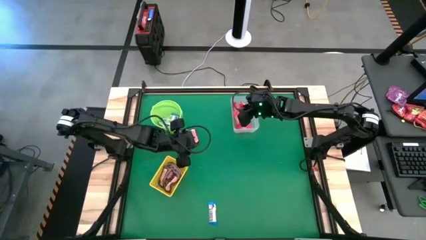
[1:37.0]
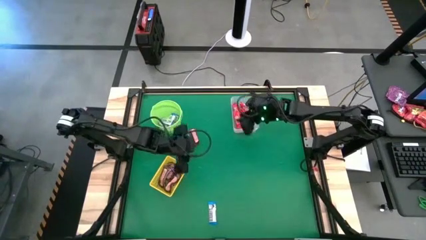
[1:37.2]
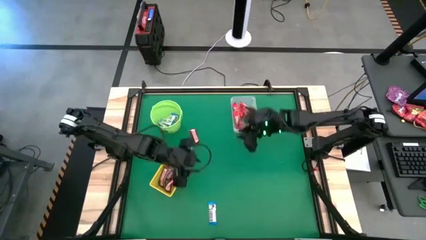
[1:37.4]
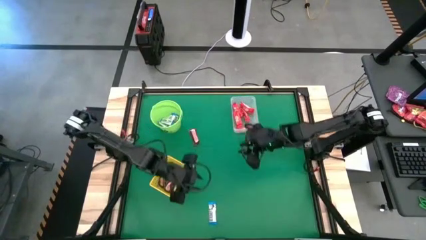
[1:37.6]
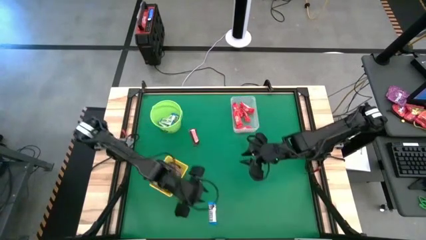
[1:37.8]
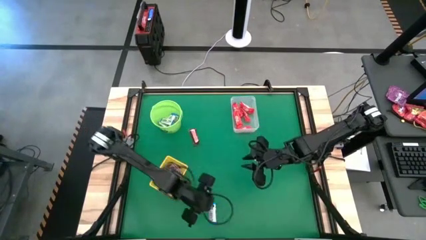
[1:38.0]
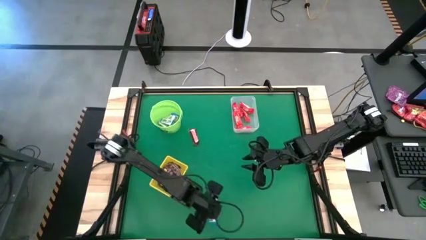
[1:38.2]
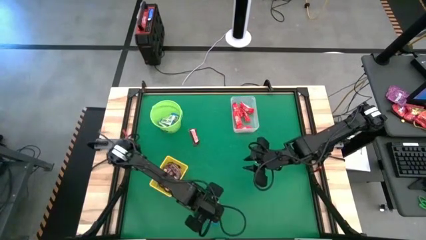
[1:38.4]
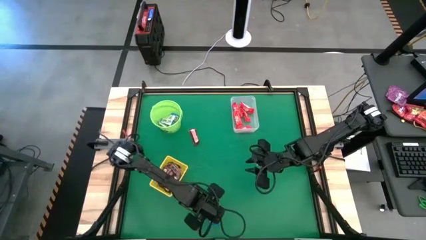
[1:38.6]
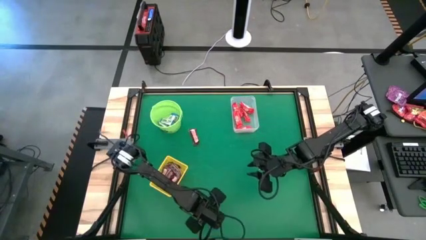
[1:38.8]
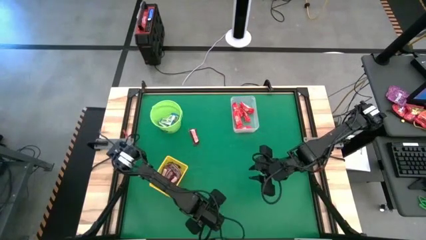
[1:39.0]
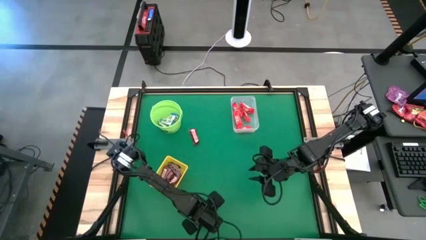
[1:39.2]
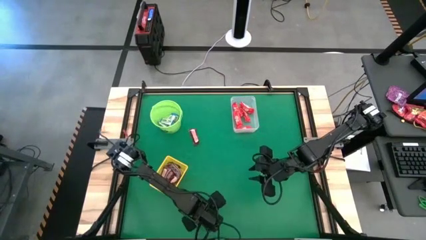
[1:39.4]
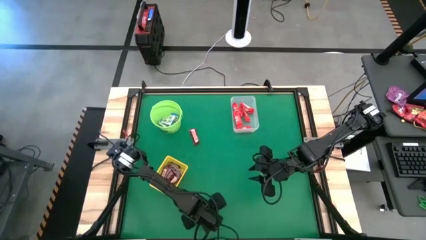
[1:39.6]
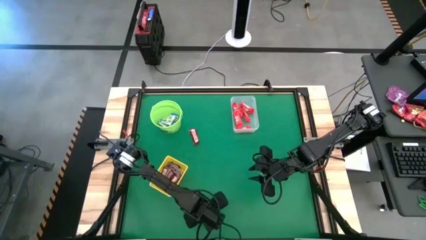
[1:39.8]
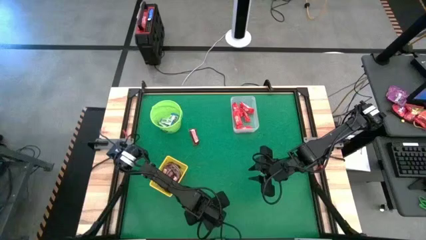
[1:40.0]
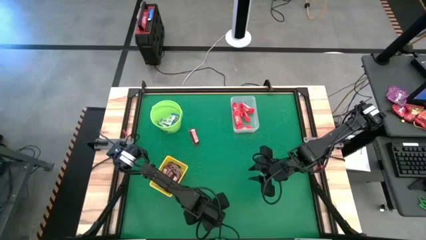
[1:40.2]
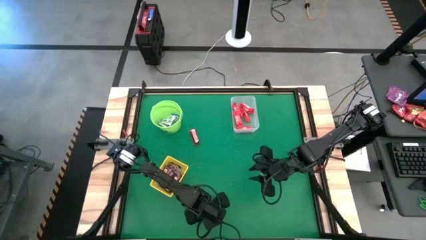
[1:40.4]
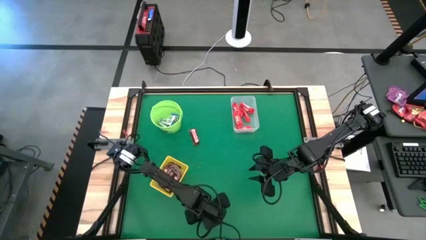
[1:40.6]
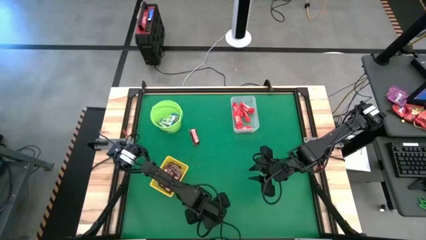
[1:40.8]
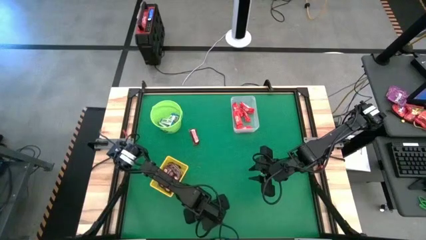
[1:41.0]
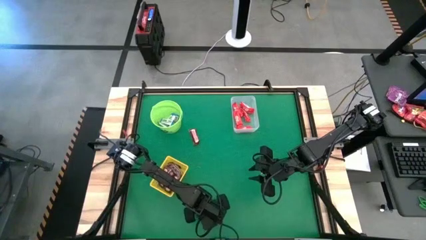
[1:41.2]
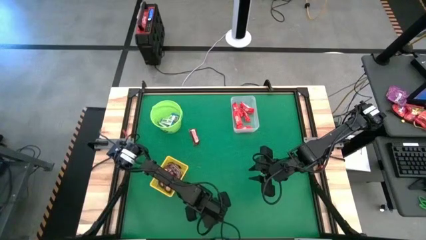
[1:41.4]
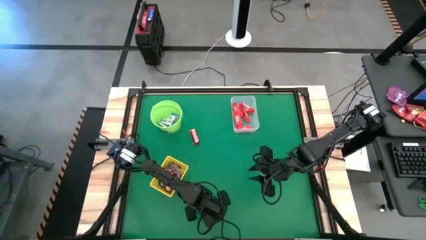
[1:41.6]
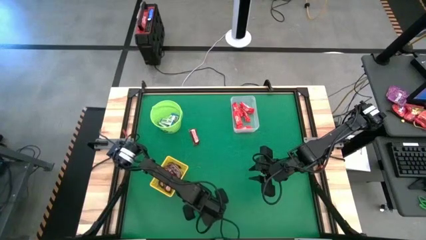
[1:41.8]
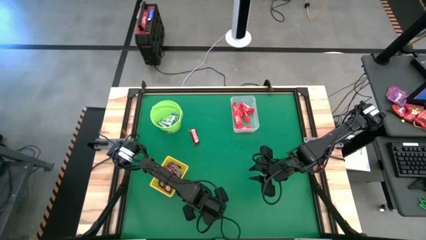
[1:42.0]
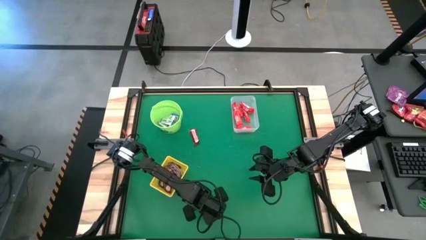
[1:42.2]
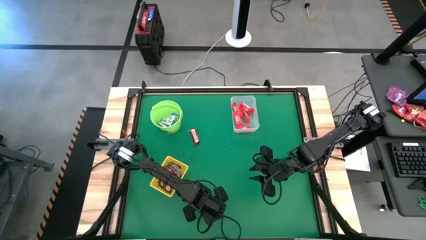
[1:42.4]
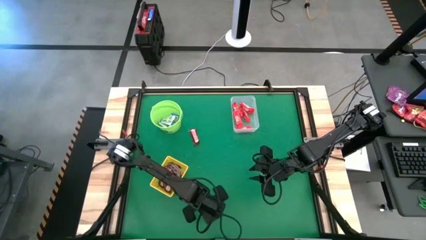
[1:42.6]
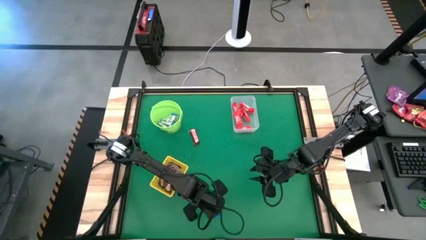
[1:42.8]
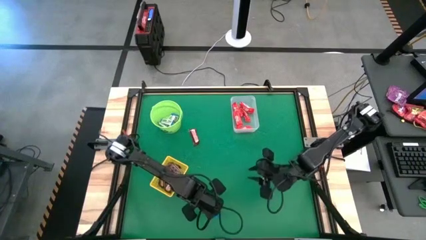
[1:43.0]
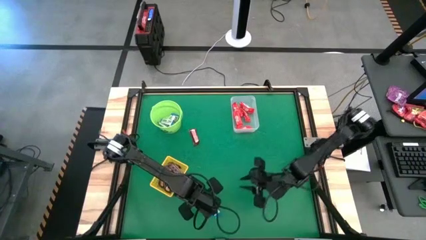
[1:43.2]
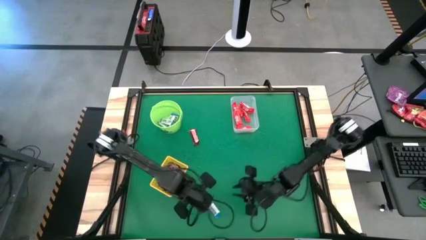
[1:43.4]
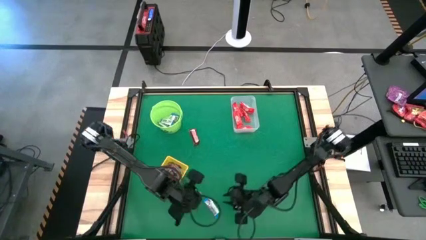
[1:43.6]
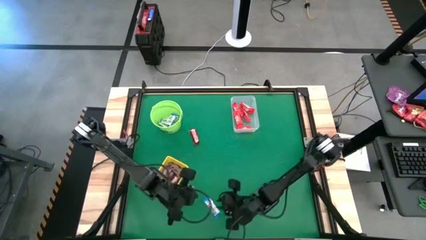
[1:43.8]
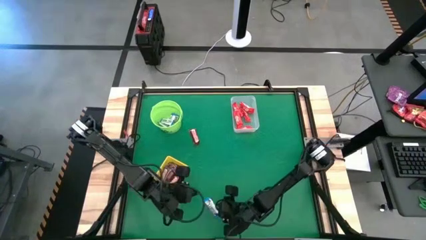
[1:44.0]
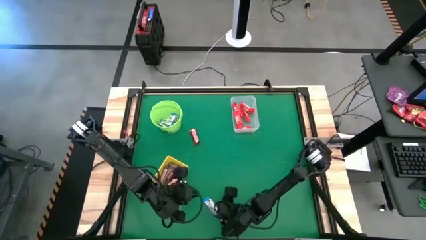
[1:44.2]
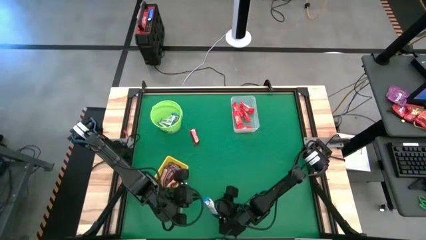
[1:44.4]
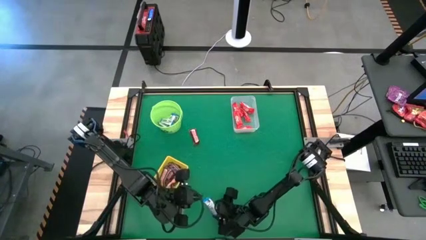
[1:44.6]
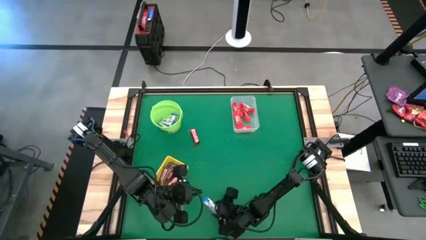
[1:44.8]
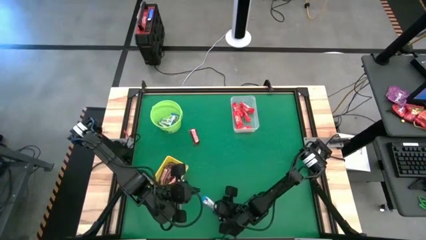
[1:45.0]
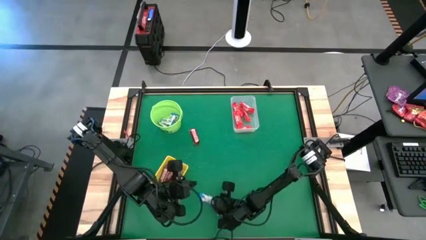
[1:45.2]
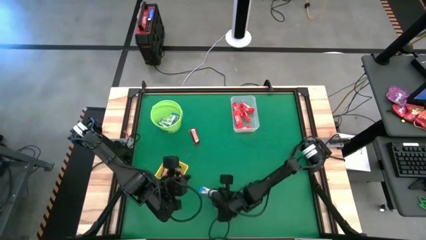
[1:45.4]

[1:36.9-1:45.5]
Task: Sort candy by brand, put in halloween buckets
Put the white chocolate into the green bucket

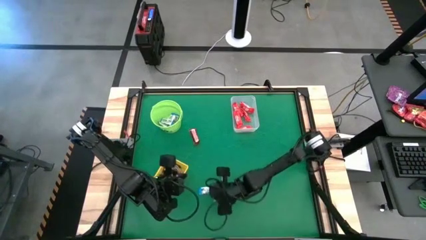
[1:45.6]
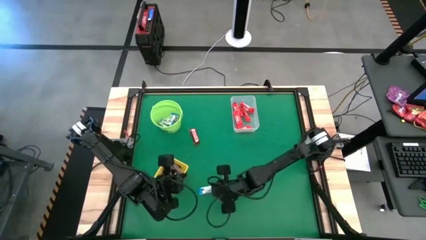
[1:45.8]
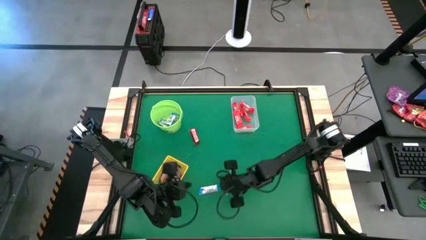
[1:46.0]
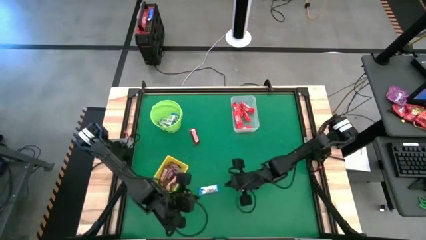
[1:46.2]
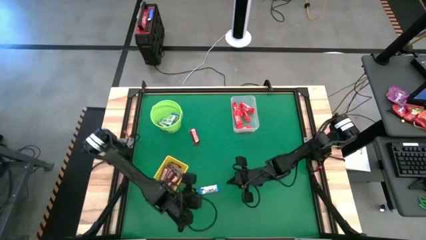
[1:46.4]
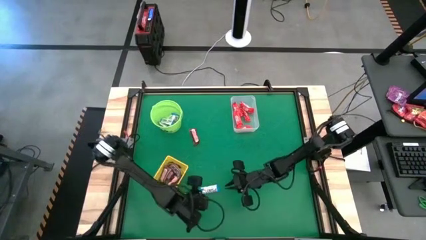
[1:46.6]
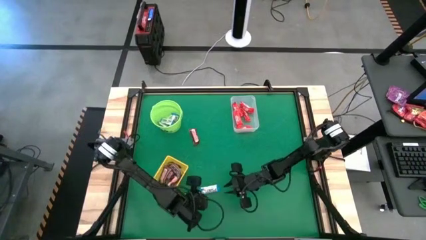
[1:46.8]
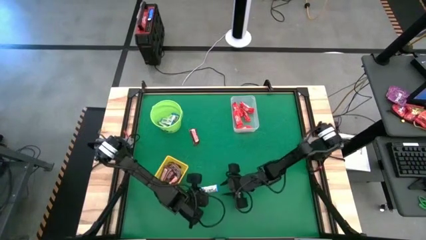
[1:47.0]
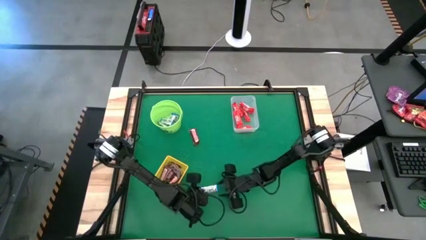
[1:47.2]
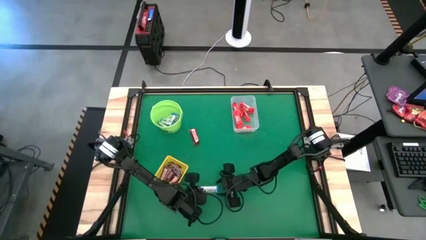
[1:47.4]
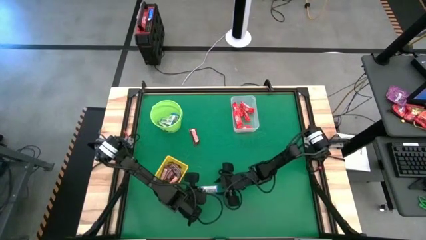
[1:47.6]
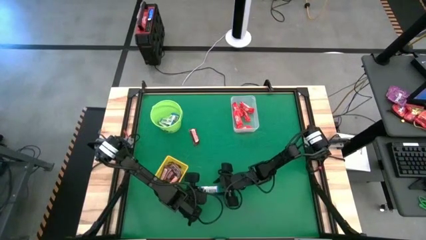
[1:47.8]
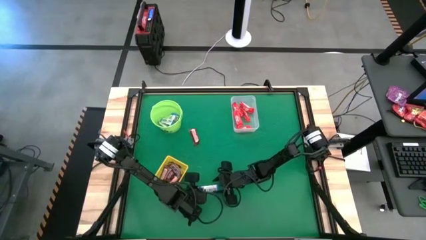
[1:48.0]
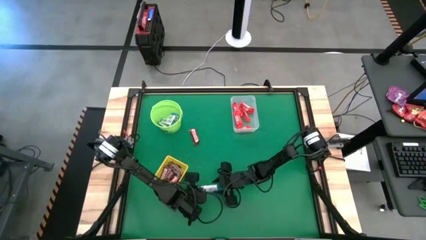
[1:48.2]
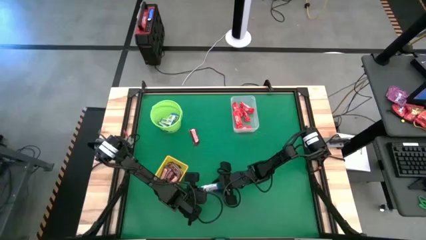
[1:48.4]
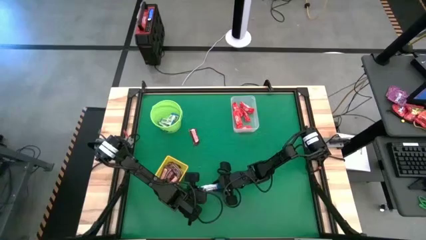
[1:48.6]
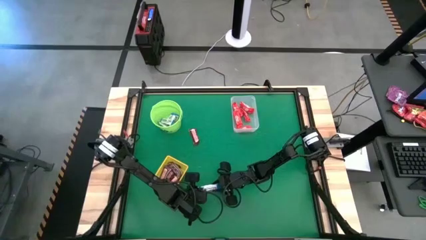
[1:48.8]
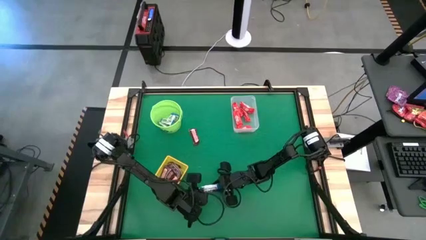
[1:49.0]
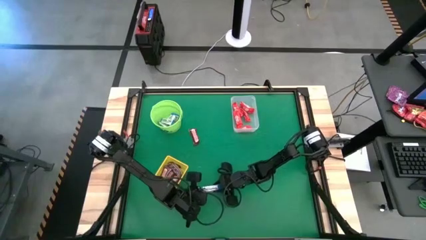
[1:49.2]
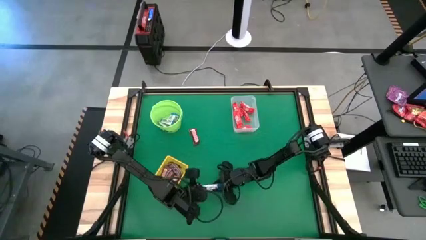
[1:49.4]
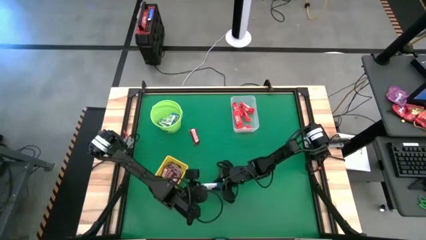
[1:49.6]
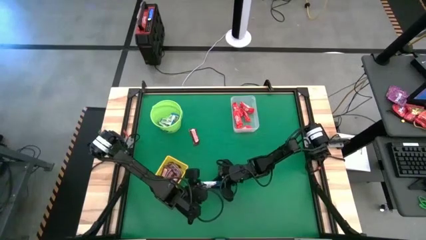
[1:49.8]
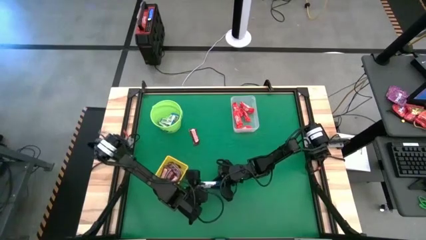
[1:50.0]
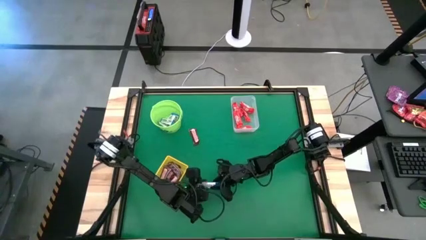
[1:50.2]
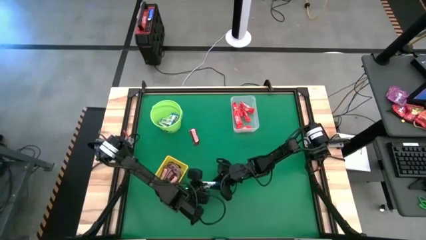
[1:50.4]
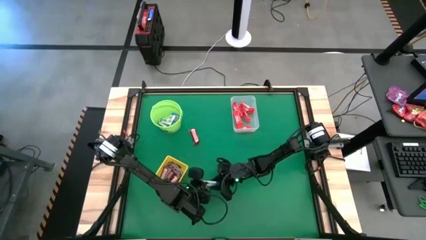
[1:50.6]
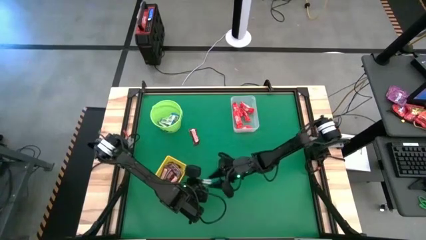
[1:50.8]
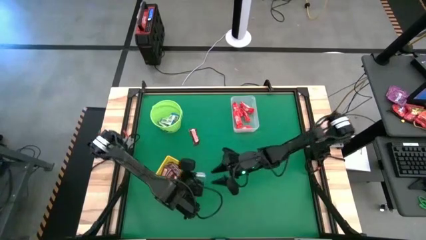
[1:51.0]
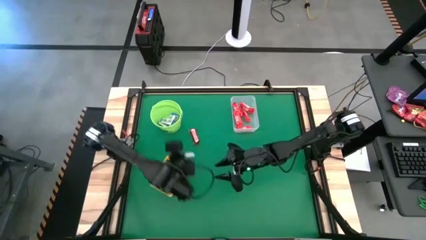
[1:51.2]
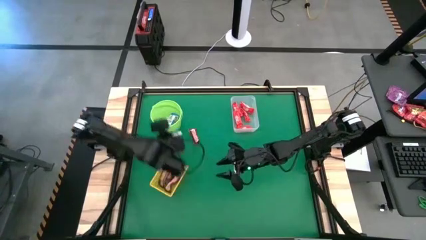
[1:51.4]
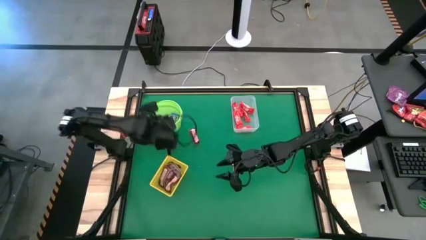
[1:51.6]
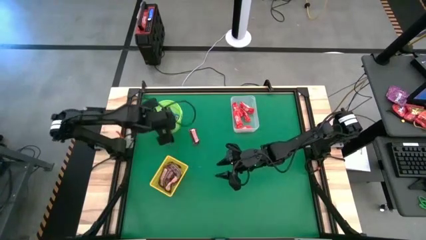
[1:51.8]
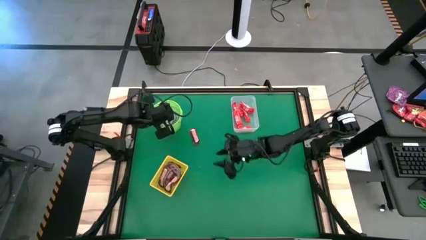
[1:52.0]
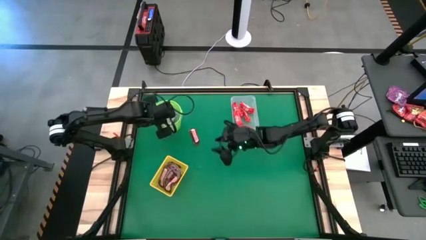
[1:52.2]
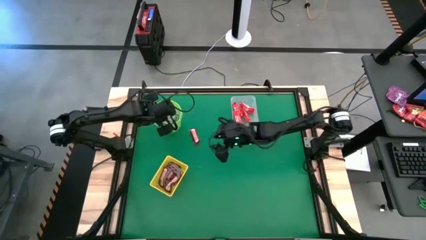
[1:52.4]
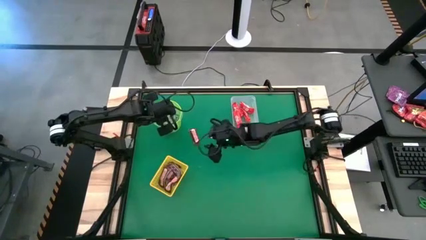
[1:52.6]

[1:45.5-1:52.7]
Put the white chocolate into the green bucket

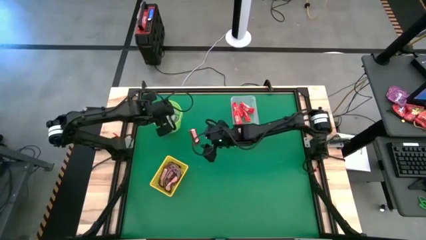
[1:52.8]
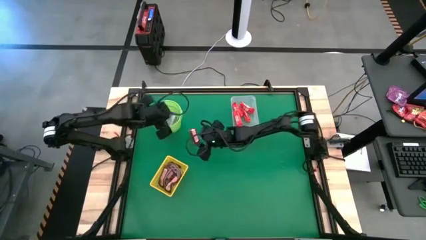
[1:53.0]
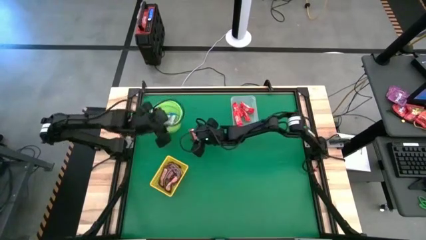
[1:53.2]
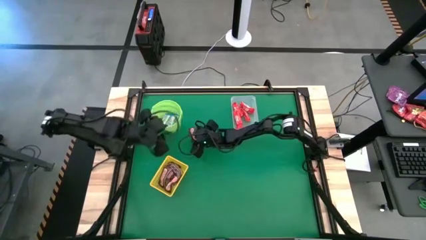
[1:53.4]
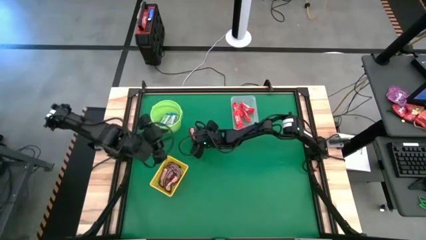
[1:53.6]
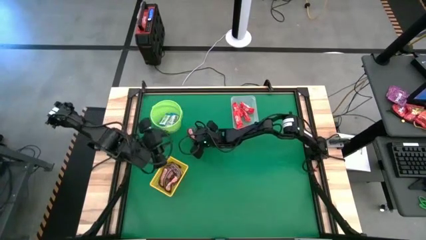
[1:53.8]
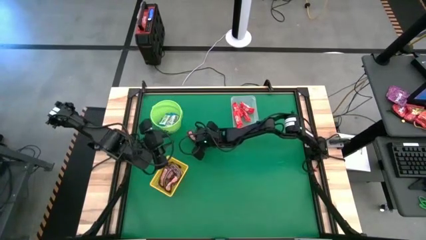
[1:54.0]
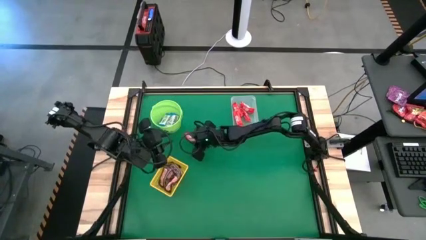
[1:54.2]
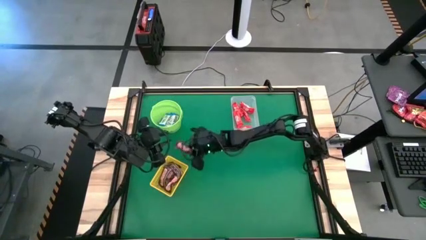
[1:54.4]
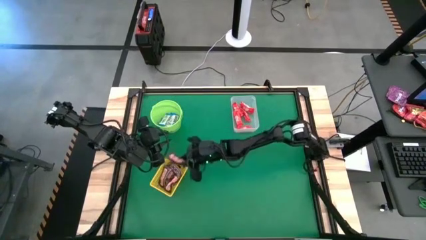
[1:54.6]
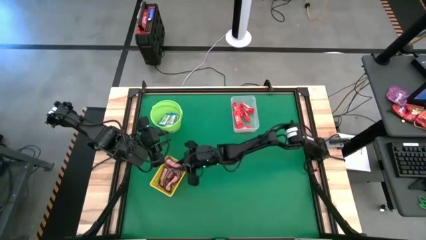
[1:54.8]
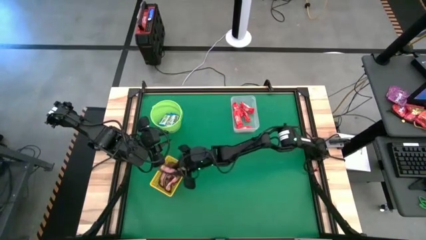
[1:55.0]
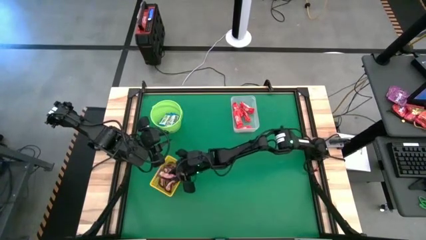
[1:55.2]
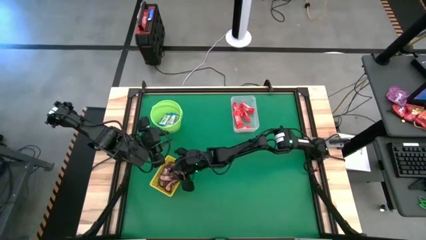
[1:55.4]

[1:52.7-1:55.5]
Put the brown chocolate into the yellow bin
